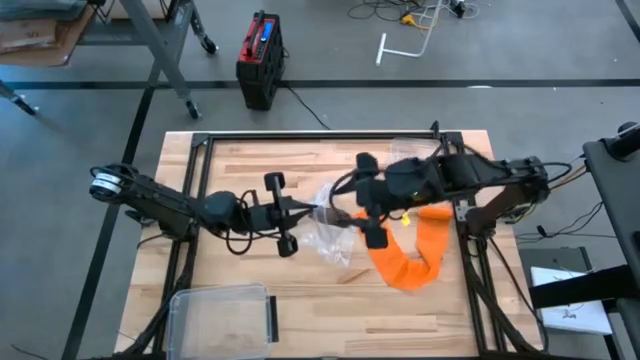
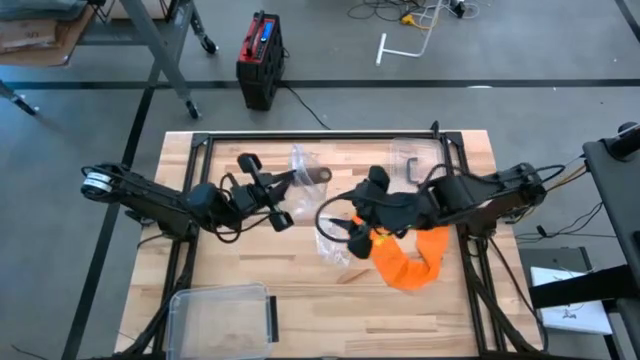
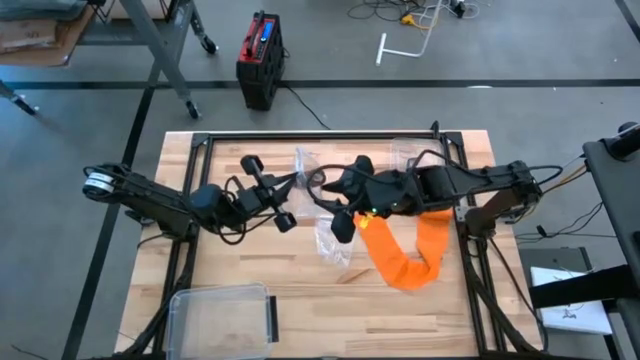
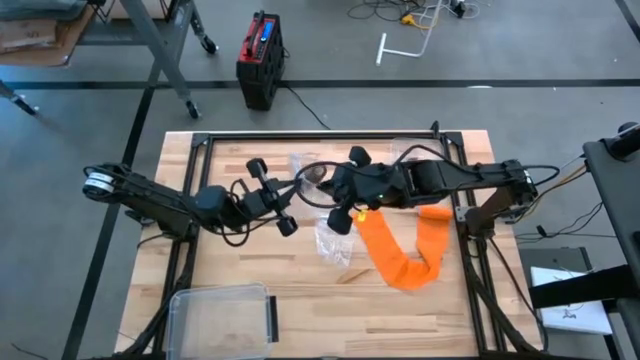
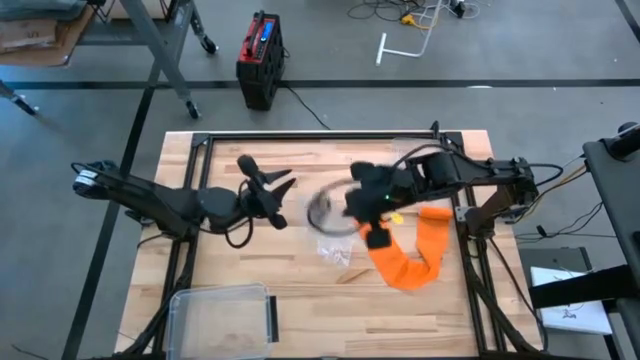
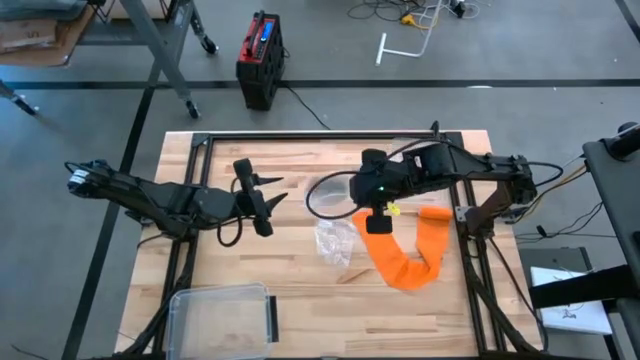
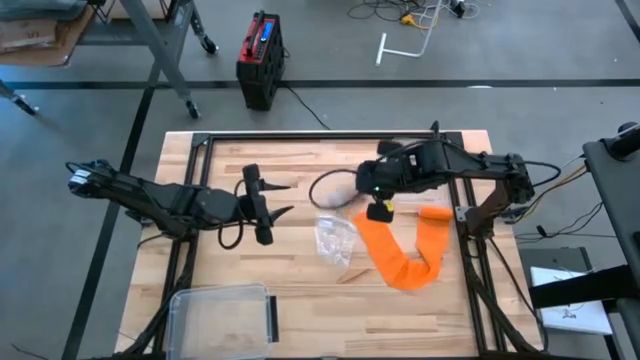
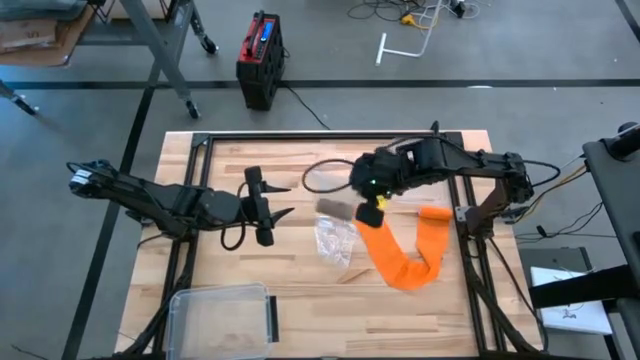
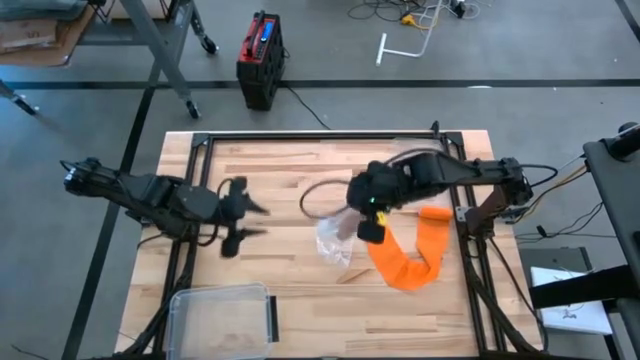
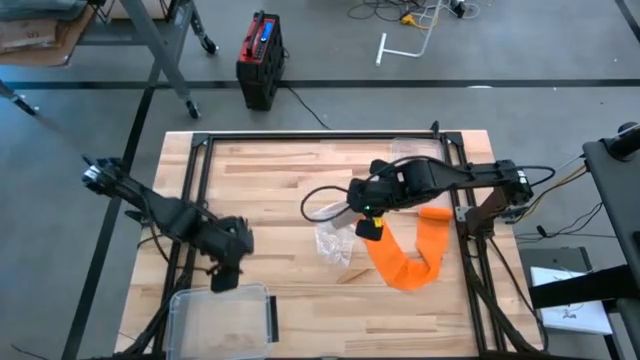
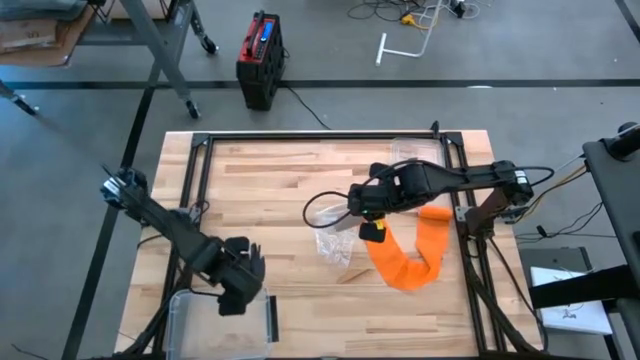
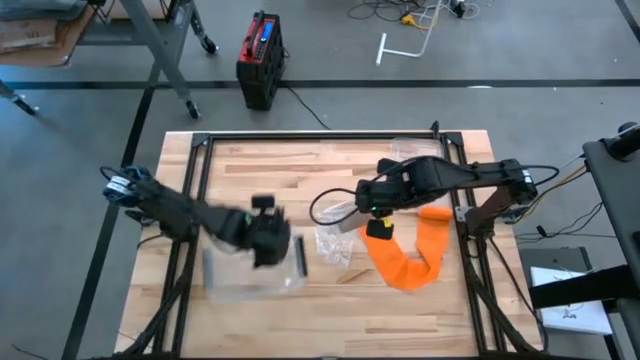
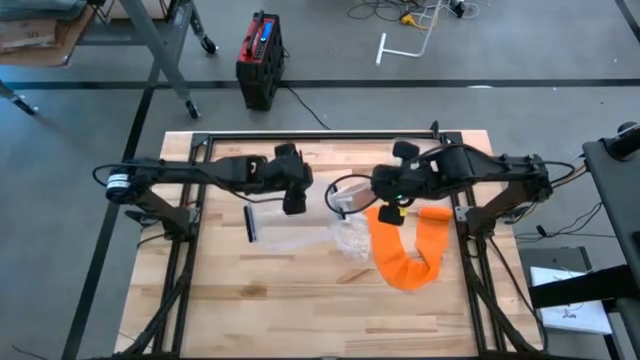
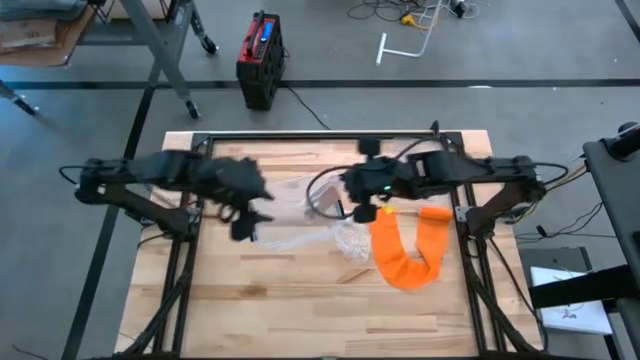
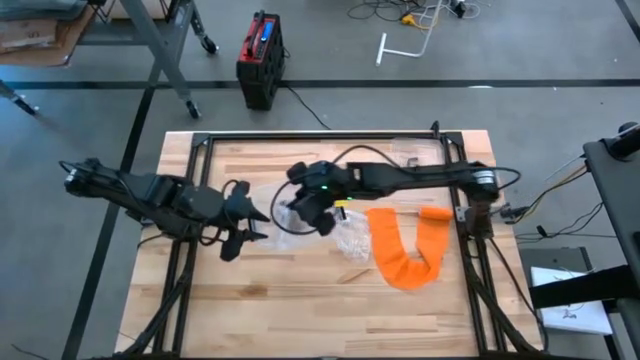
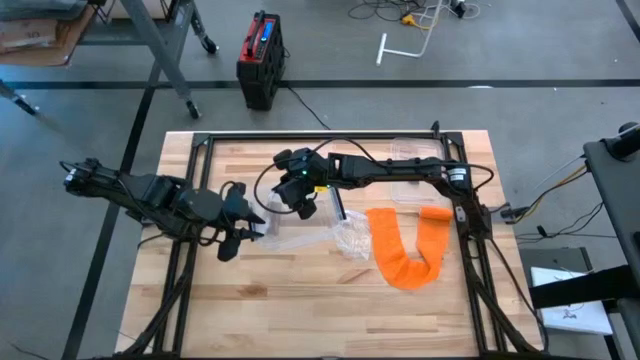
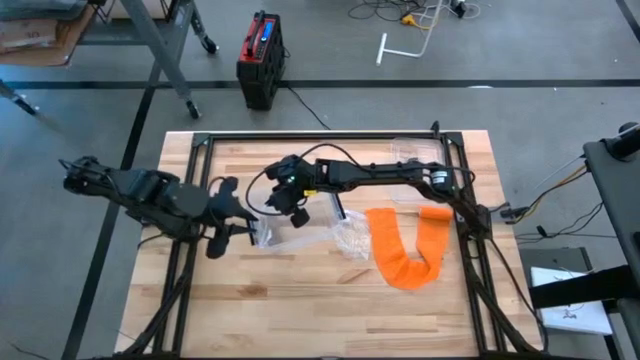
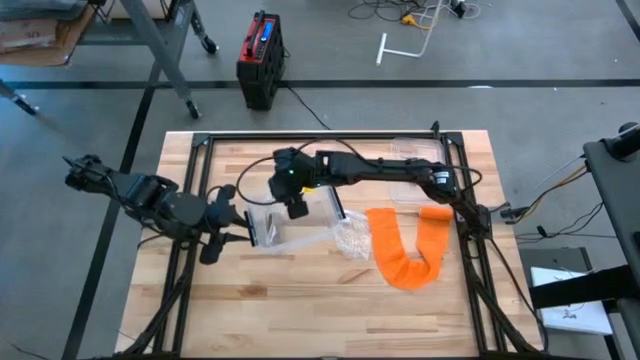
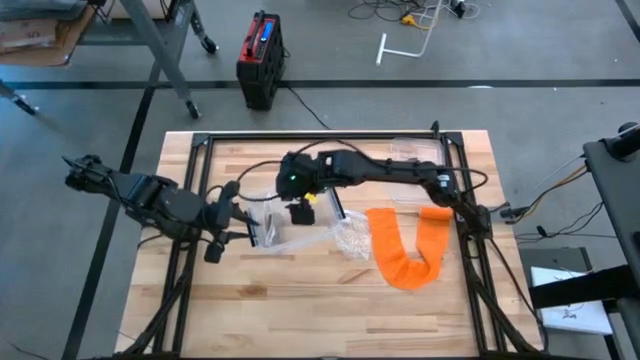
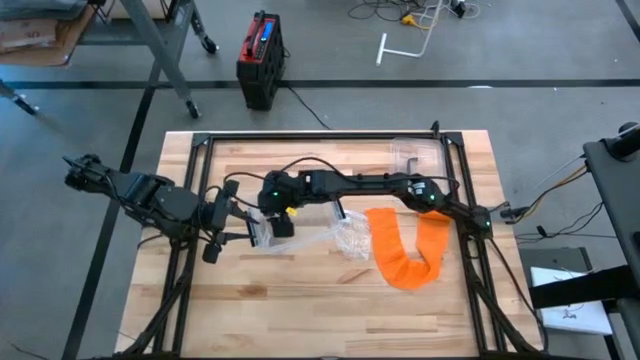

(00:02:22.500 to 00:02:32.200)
Task: Roll bandage
Put the top transparent zip bag into the transparent bin

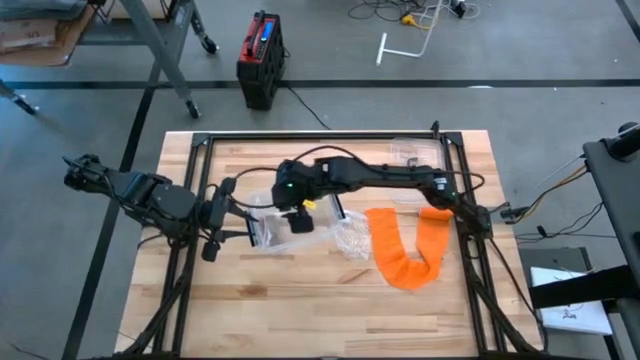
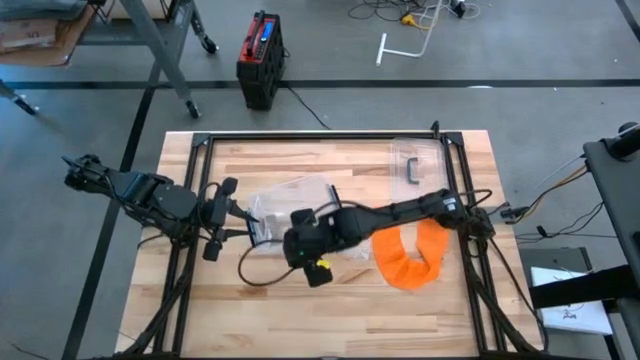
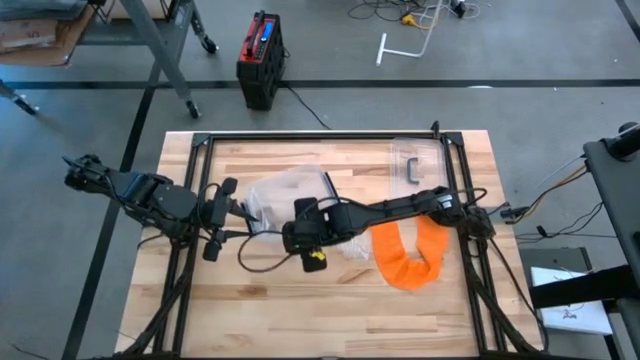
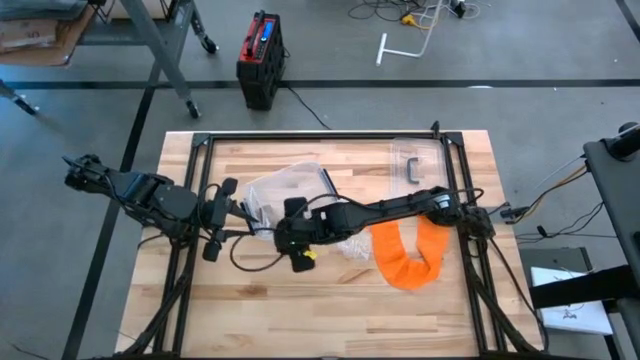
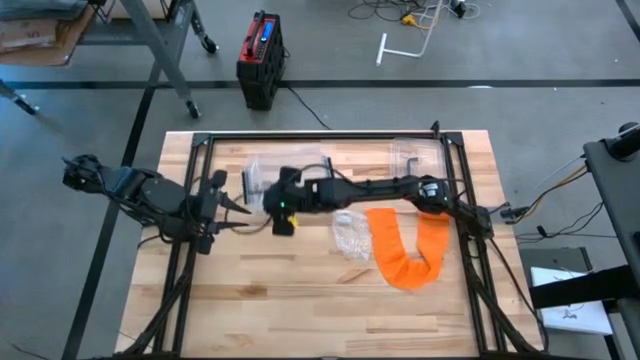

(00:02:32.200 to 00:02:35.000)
Move the transparent bin to the top corner of the table

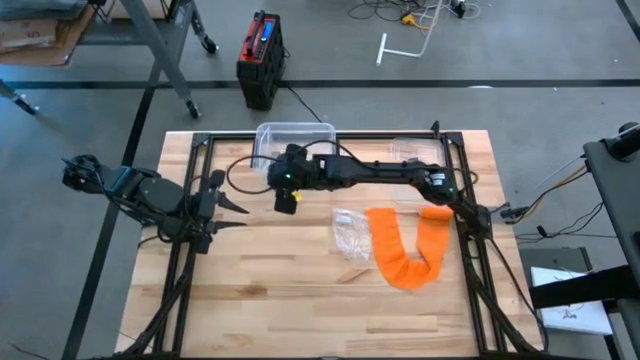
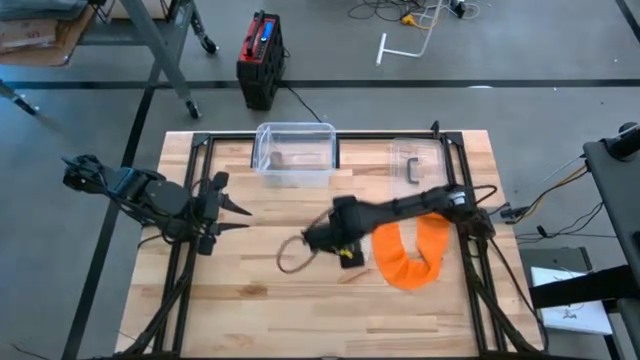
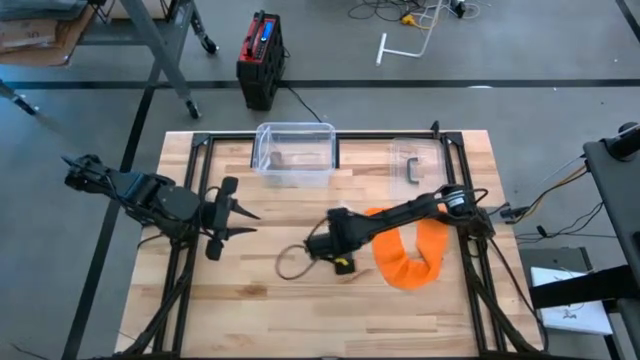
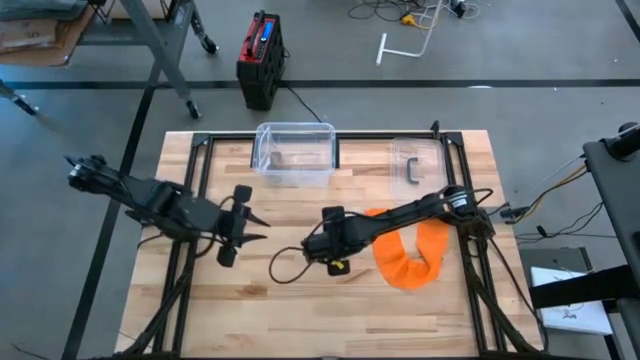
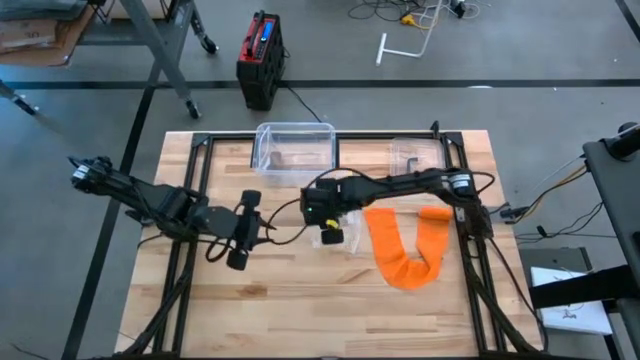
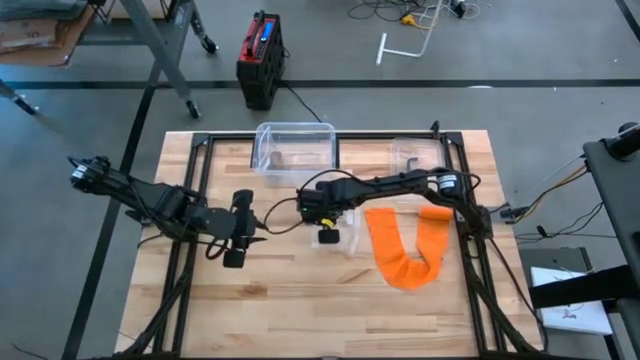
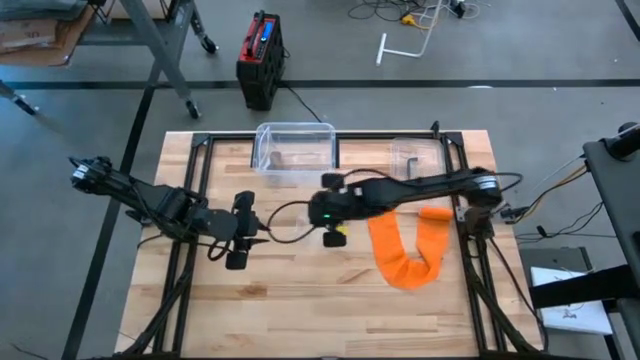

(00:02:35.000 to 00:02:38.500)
Prepare the transparent zip bag

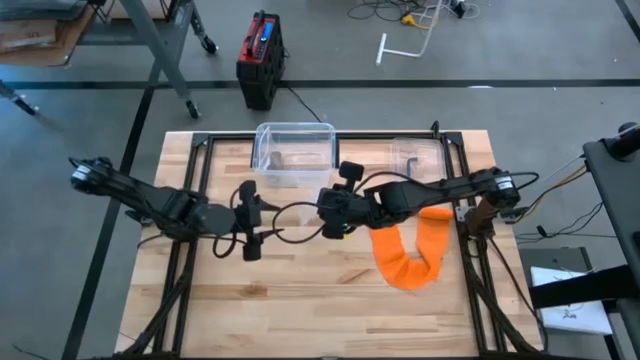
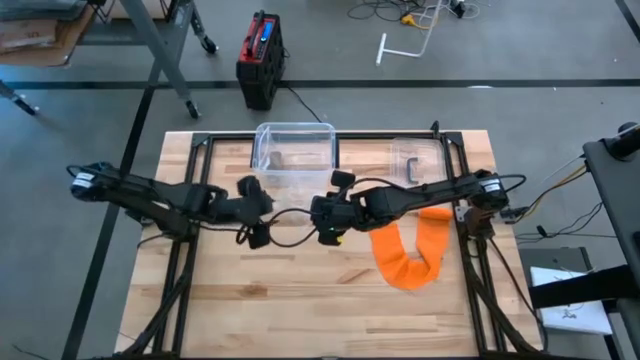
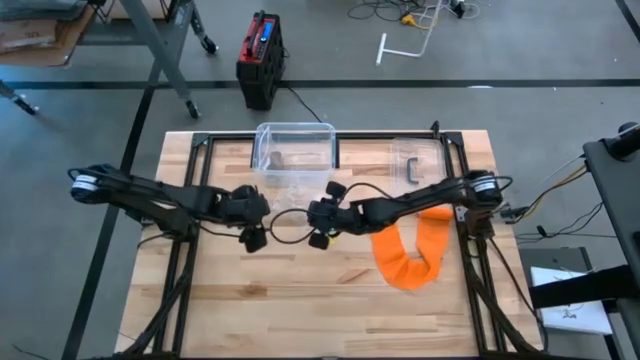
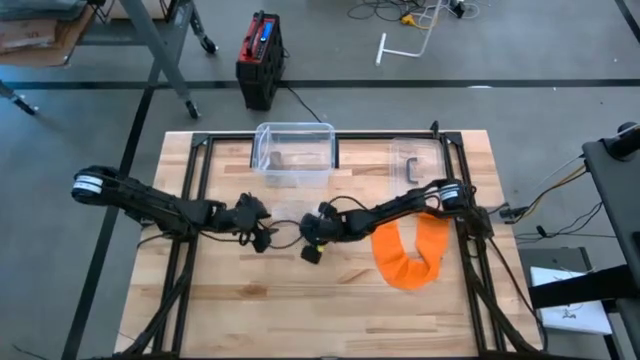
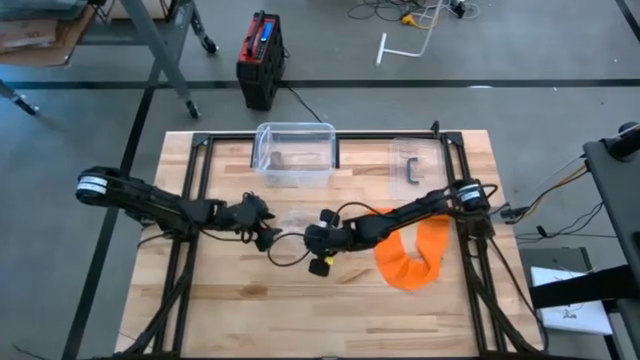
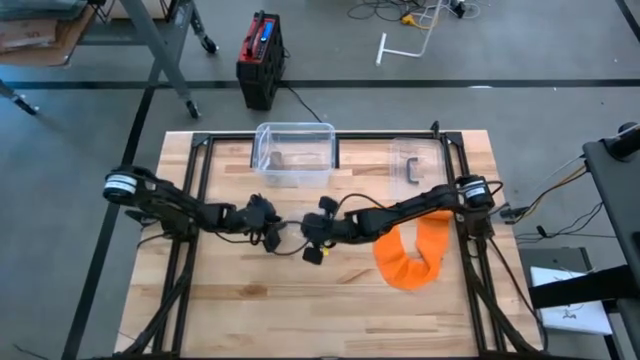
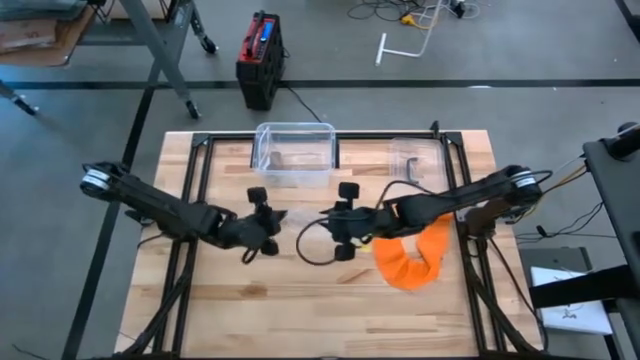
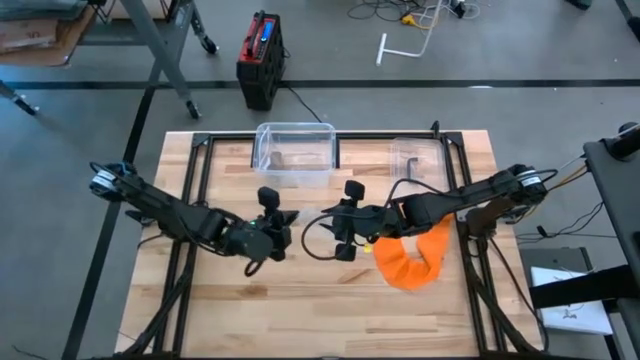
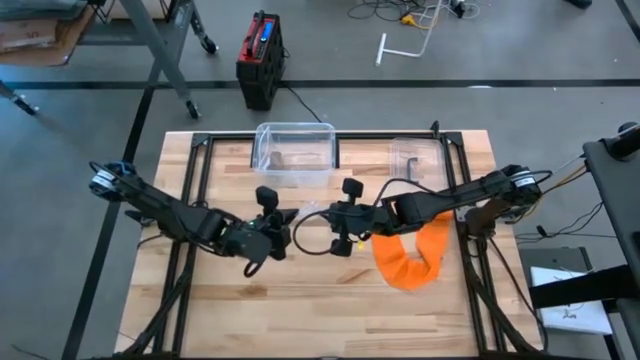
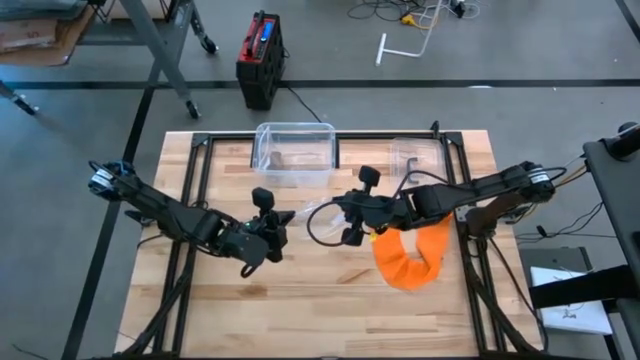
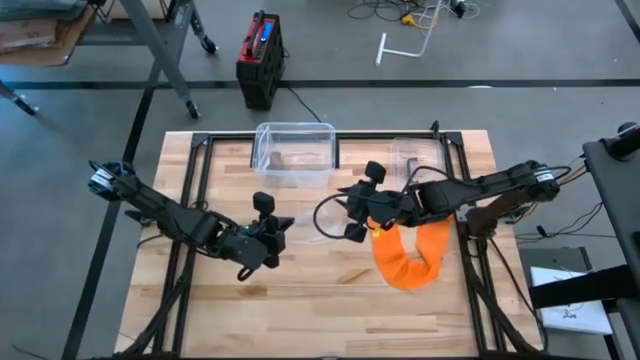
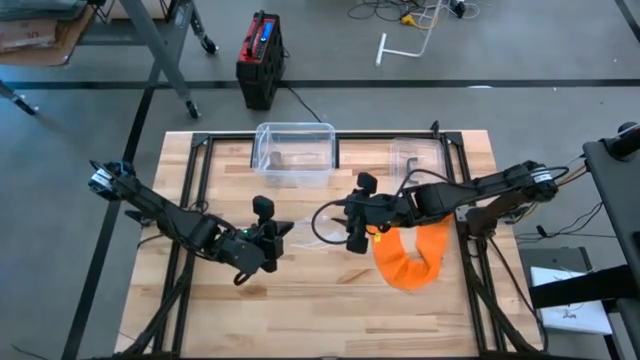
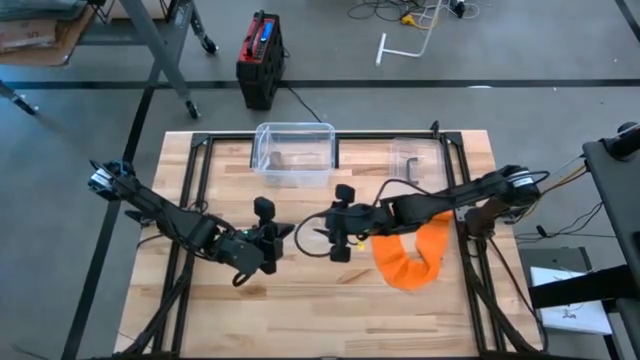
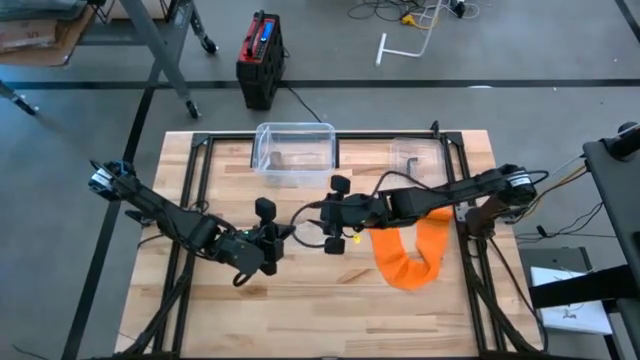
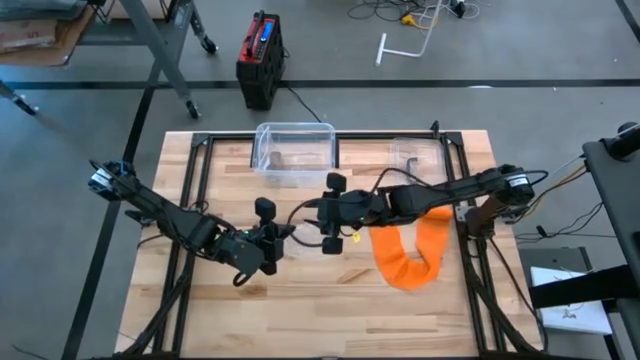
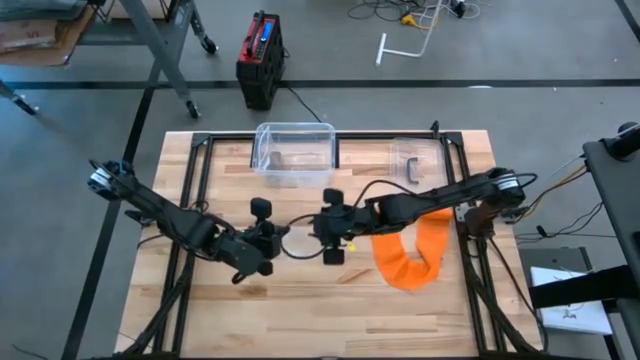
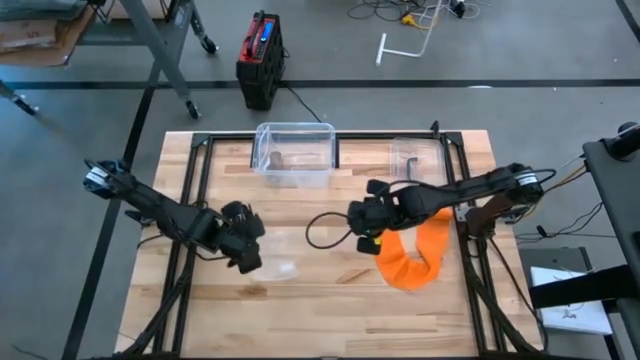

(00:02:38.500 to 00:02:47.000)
Prepare the transparent zip bag
